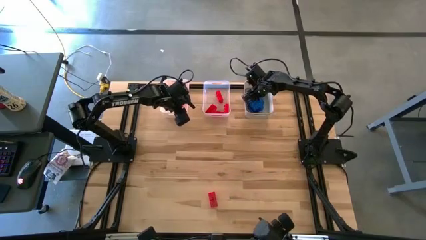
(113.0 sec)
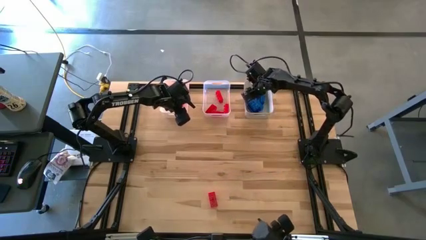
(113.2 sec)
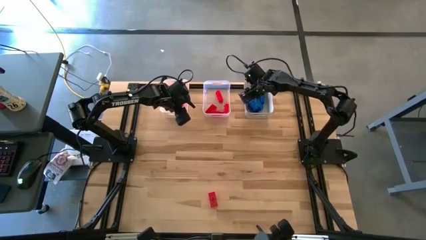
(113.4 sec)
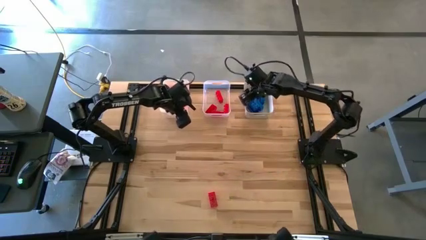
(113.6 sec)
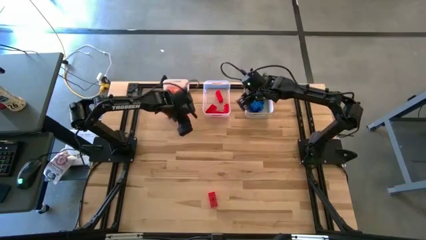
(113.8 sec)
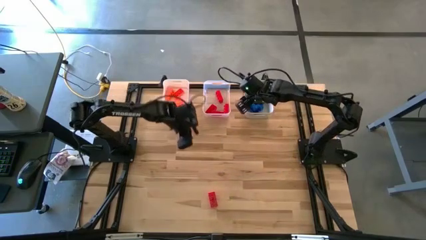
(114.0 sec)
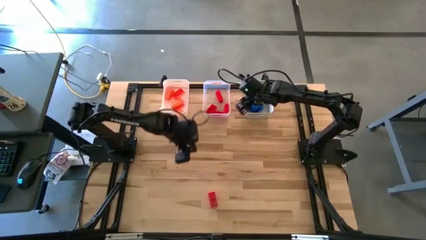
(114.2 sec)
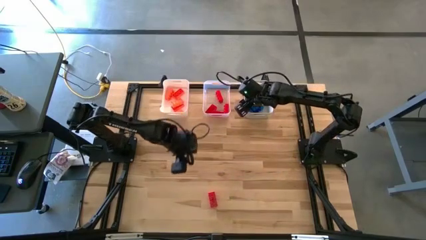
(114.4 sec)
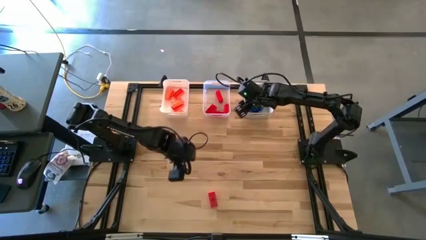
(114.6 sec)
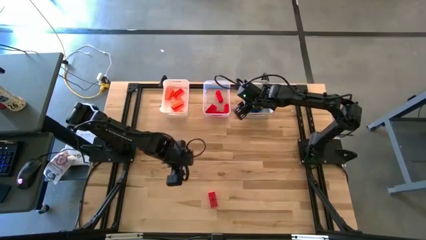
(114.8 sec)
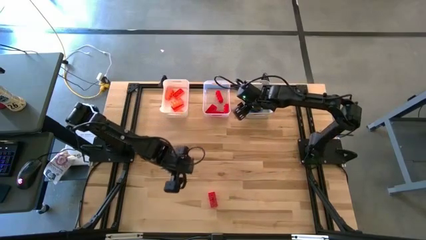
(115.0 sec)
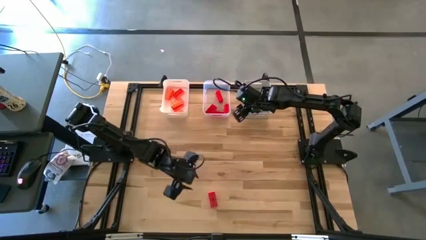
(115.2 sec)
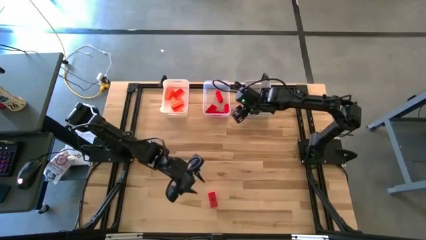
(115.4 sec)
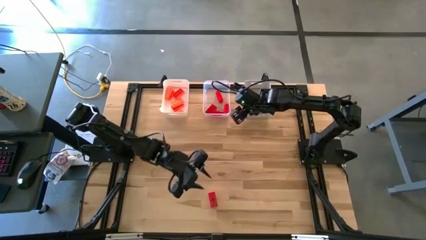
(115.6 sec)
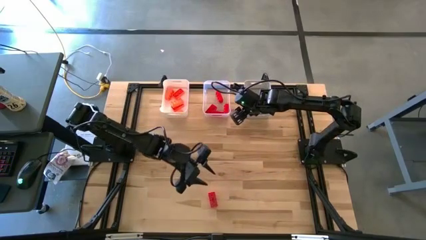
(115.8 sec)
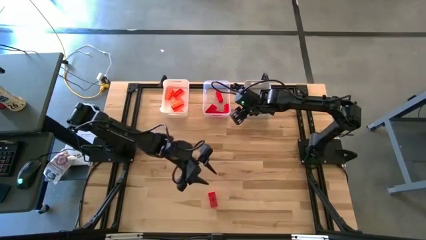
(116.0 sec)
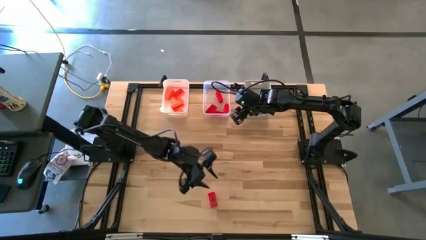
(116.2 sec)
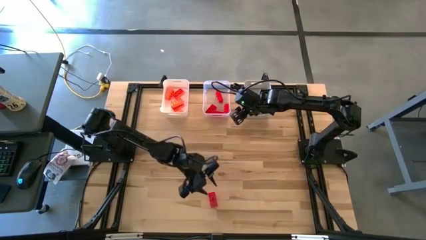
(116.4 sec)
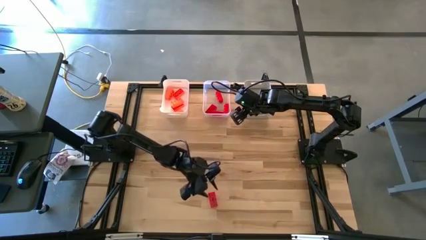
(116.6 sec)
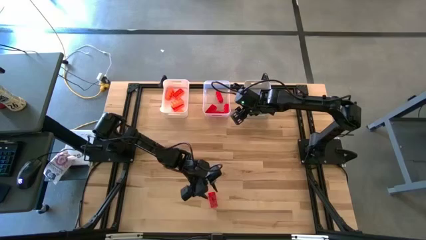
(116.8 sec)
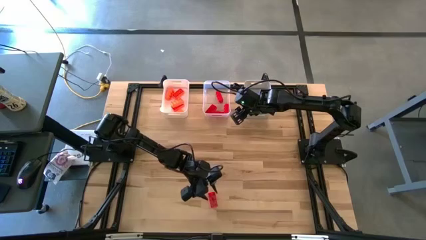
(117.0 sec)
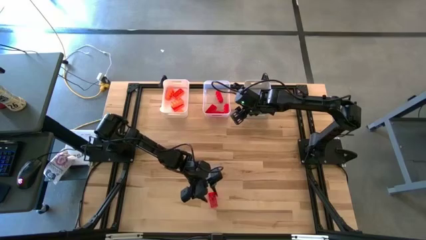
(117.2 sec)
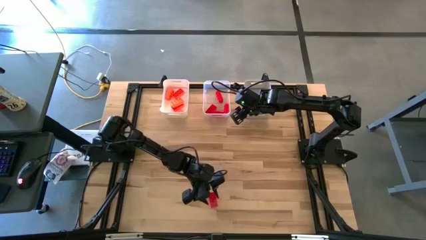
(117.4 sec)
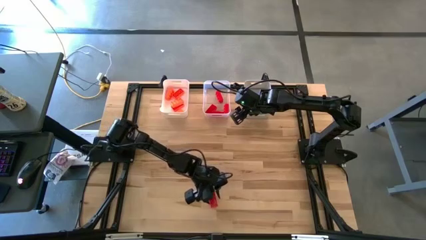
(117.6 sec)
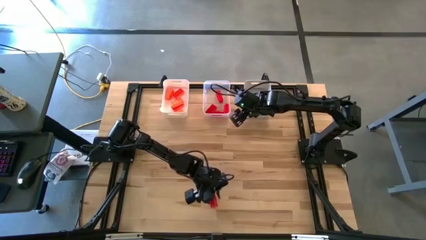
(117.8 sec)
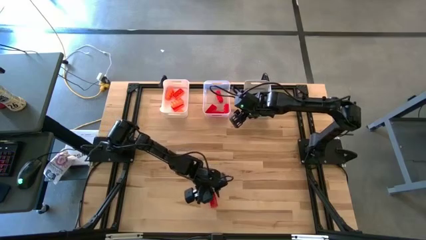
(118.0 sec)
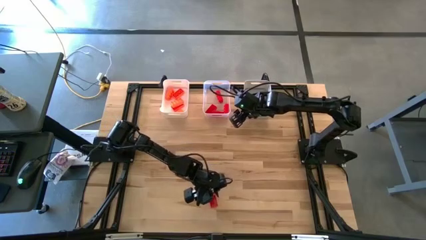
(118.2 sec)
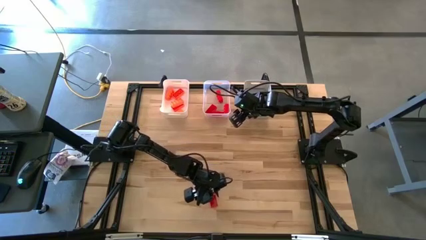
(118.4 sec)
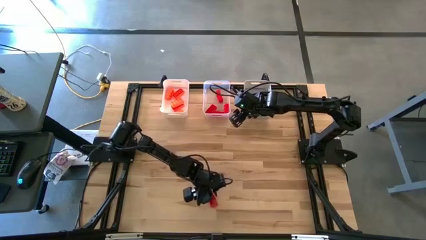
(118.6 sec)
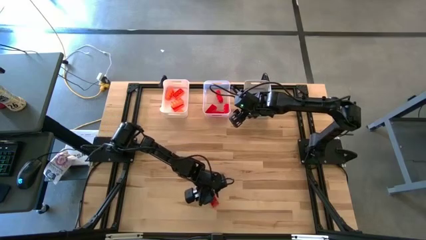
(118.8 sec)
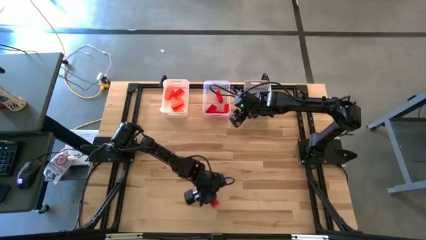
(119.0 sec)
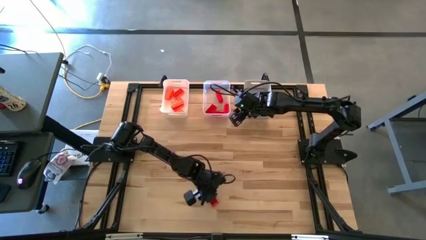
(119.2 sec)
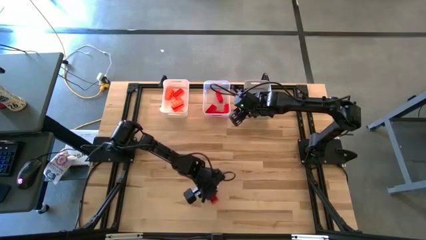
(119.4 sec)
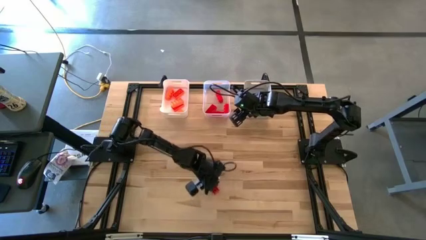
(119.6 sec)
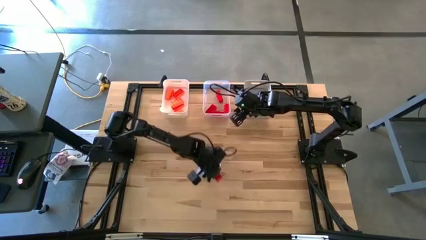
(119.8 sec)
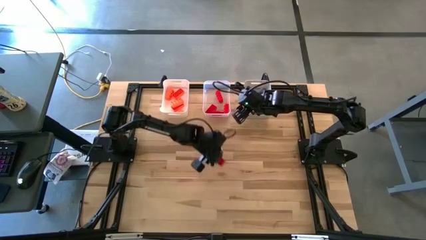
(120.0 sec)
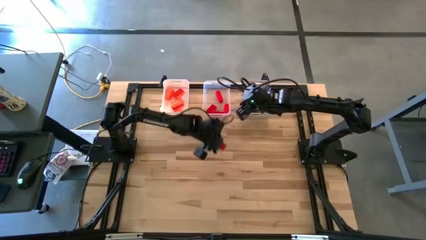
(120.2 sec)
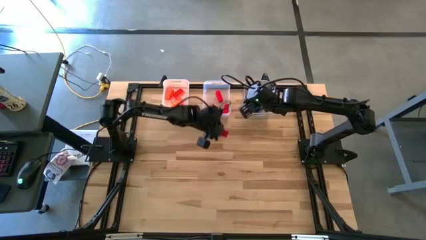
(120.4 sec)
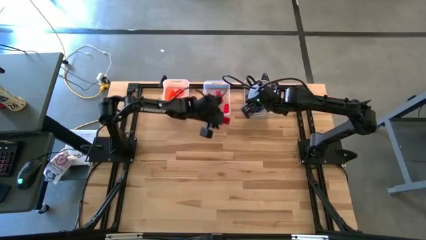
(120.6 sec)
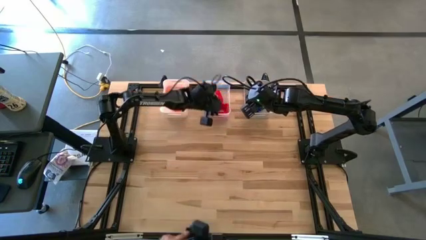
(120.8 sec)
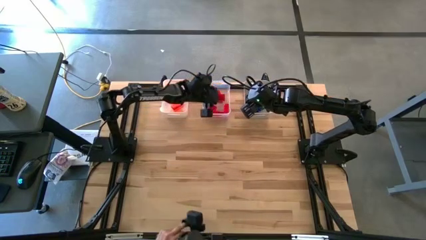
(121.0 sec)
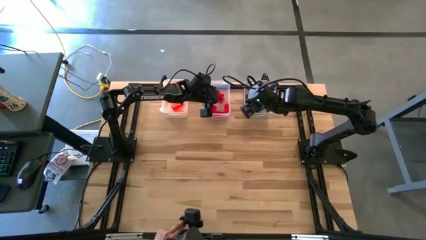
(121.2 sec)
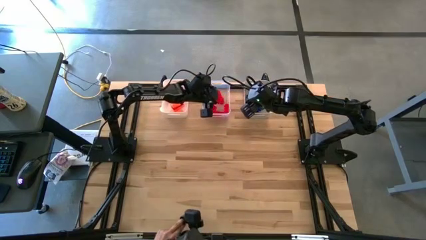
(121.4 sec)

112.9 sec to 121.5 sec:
Task: Sort & place blocks by color
Put the red game piece into the transparent bin

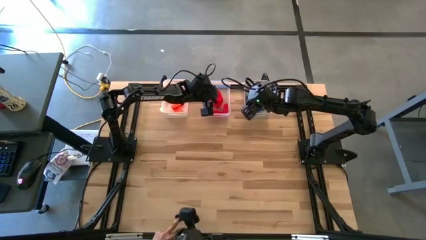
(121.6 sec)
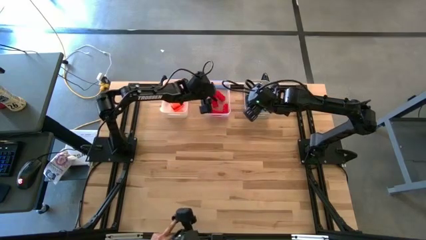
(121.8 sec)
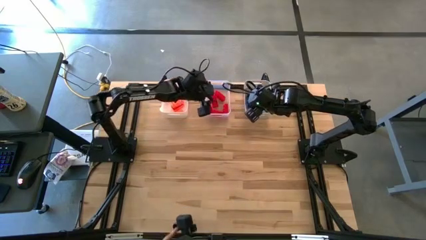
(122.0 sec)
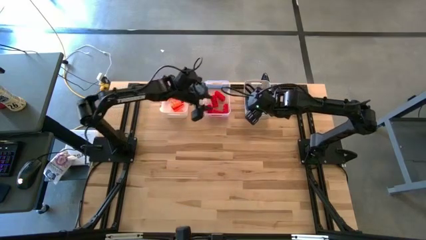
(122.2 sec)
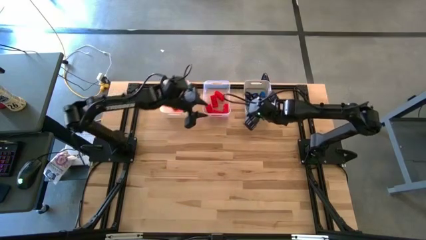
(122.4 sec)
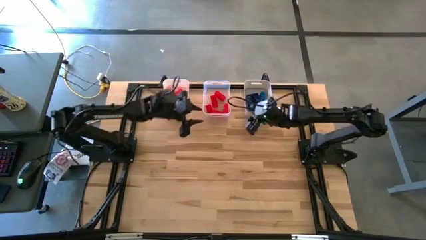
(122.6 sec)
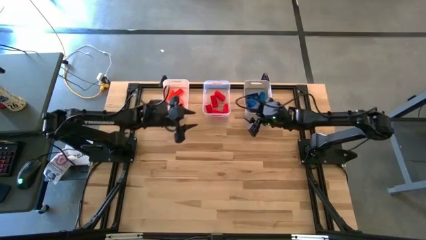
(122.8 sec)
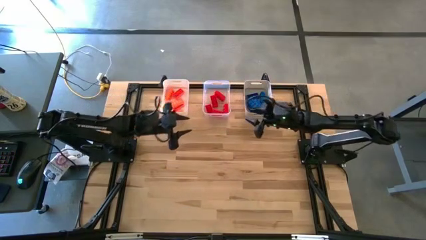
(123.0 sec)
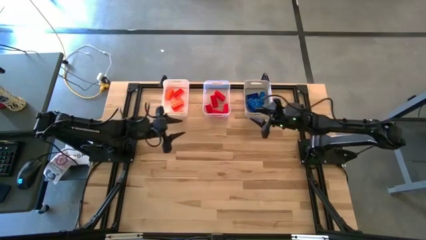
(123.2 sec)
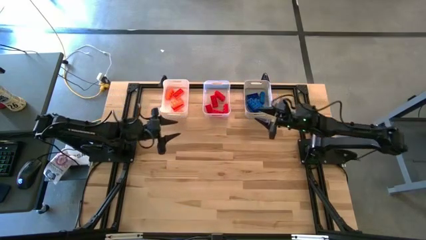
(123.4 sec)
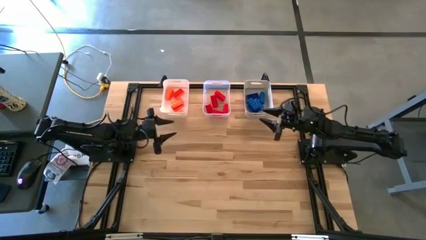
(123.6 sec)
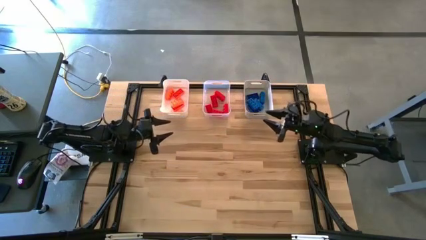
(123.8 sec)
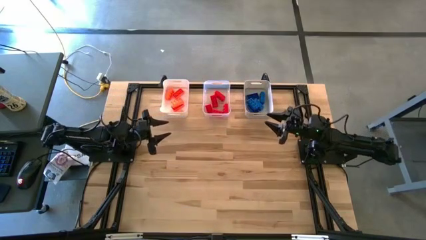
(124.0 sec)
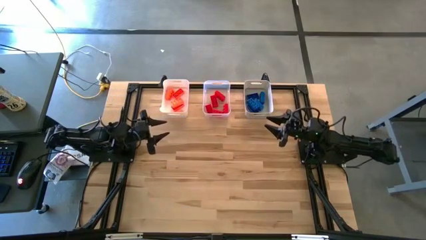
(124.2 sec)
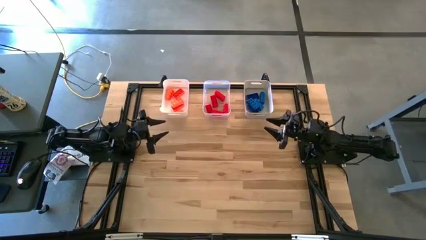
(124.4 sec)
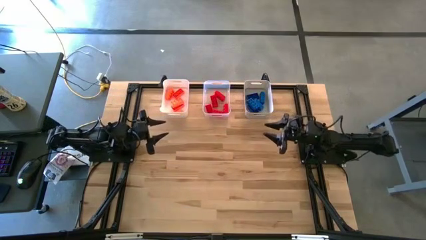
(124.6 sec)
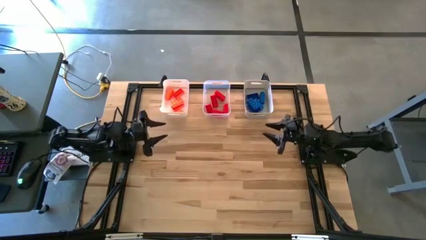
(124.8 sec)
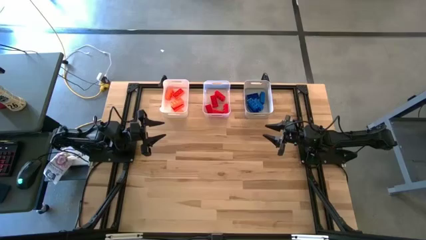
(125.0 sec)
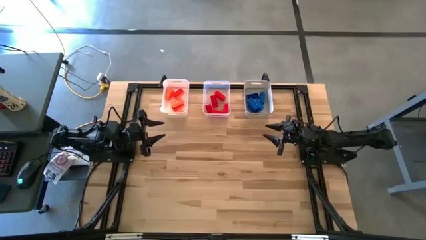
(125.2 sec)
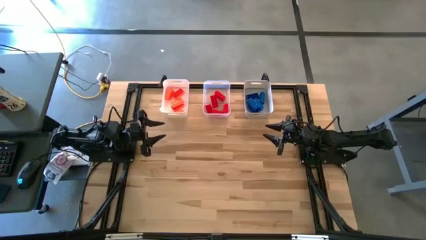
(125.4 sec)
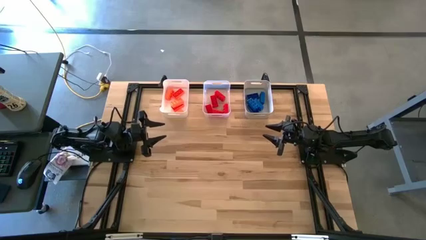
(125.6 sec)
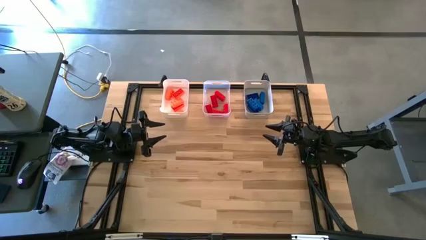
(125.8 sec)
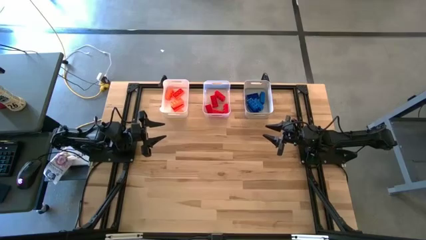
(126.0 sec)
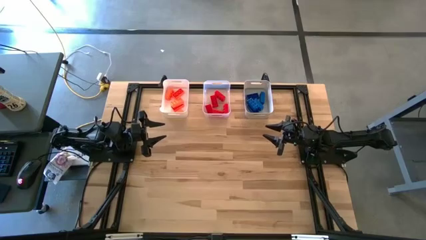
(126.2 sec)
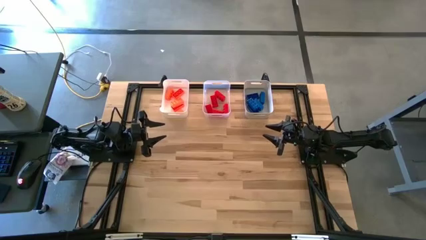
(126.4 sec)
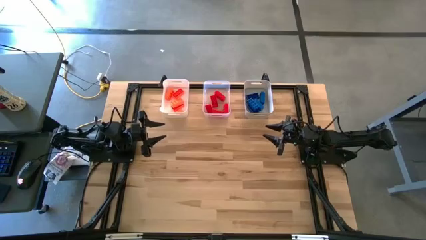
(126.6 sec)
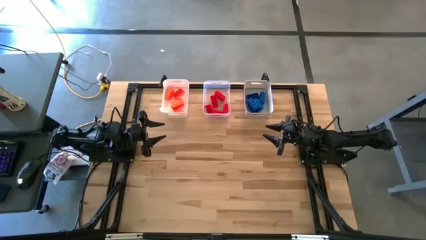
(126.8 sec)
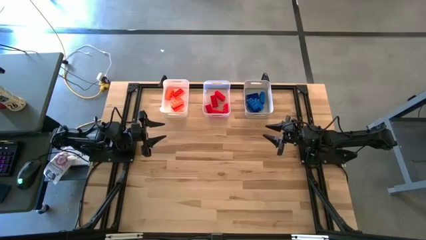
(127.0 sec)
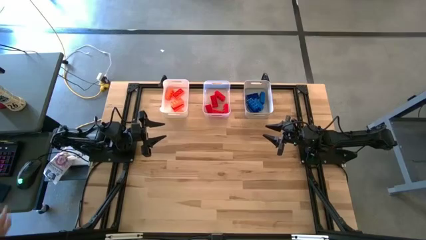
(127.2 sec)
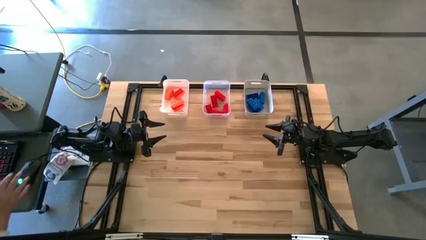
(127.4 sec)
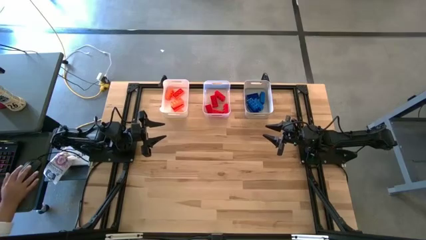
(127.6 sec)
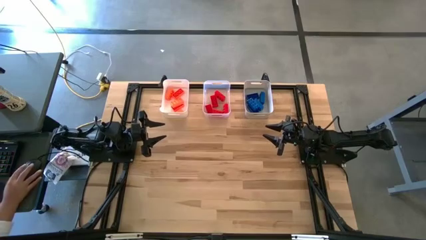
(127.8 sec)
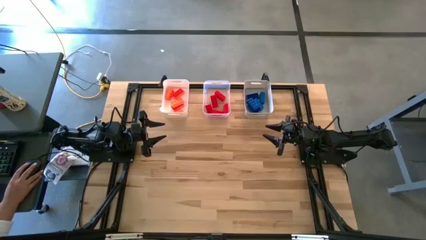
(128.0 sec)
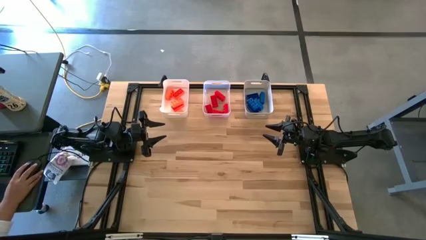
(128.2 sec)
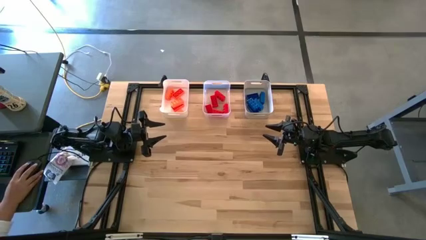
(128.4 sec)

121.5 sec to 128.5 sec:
Return to Home Position

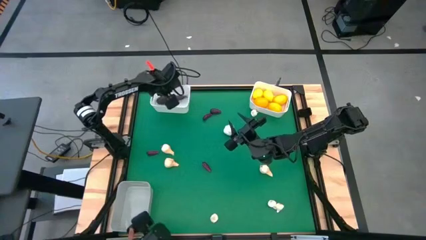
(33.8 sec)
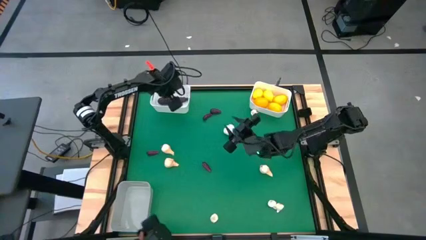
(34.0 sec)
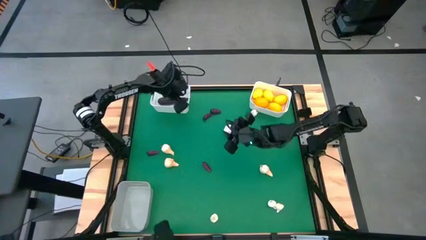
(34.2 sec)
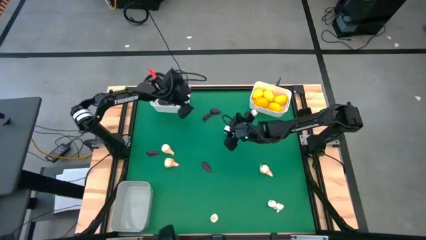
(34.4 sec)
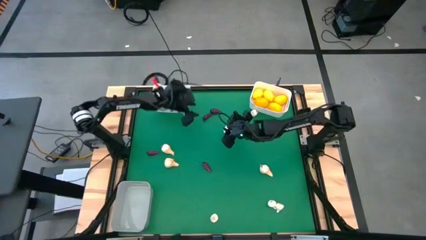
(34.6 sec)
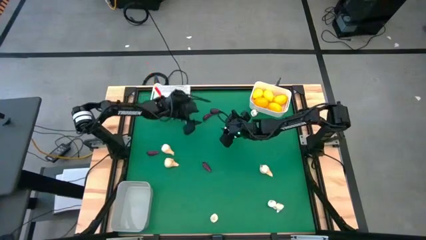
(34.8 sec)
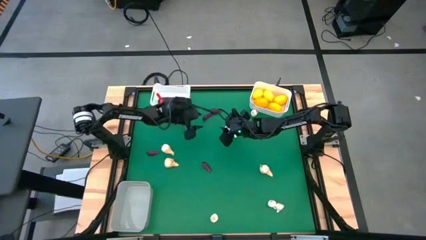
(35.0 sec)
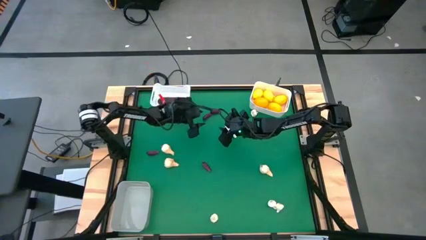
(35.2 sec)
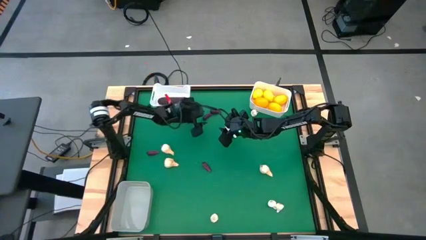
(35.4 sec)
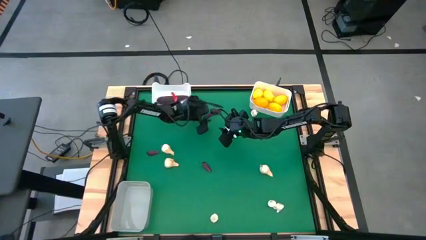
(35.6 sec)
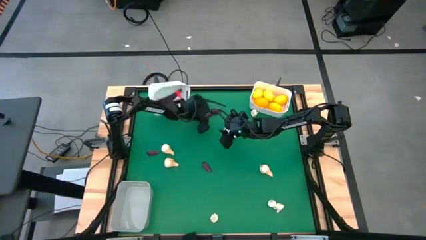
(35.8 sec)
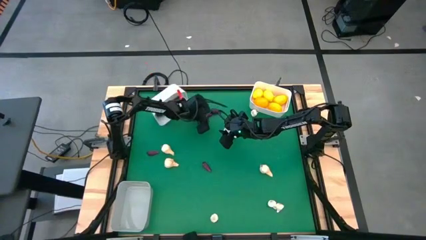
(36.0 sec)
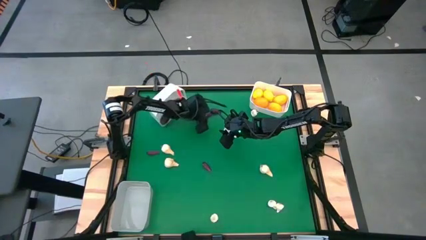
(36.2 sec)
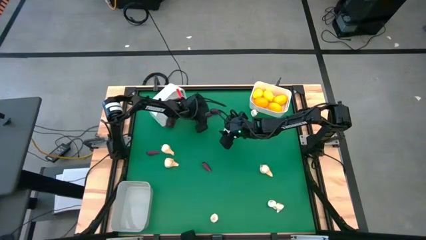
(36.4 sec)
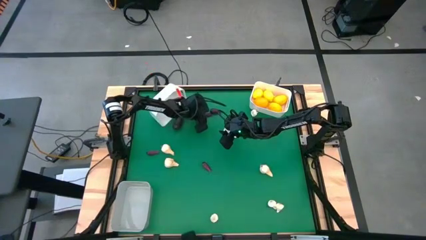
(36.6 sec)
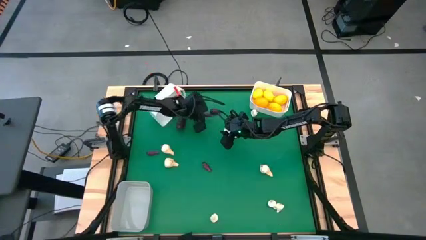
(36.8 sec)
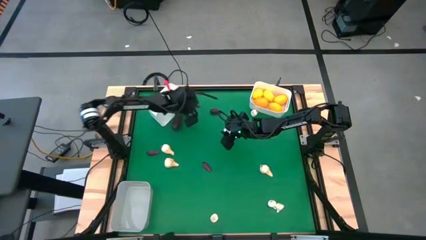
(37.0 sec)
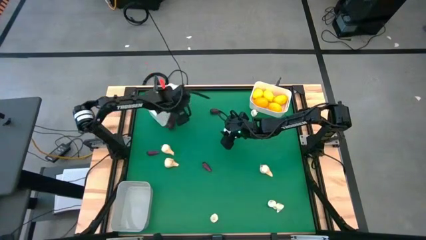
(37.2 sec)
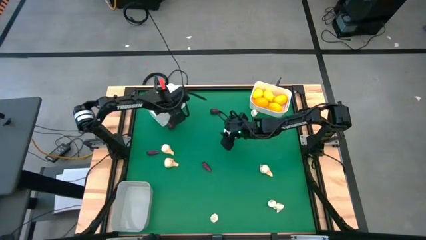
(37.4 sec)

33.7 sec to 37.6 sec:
Task: Sort produce into baskets
Put the violet eggplant into the left white bin
